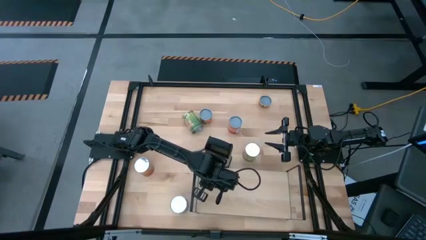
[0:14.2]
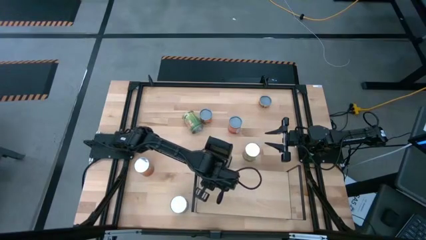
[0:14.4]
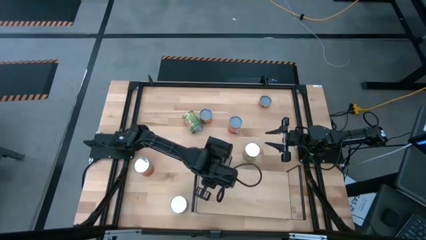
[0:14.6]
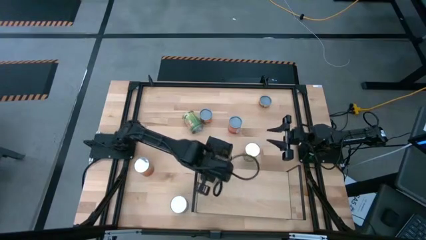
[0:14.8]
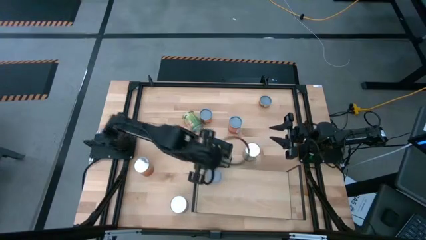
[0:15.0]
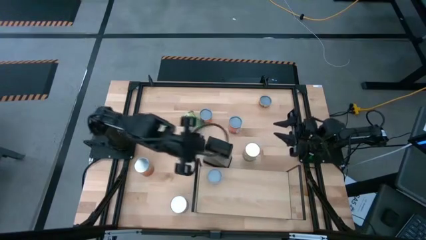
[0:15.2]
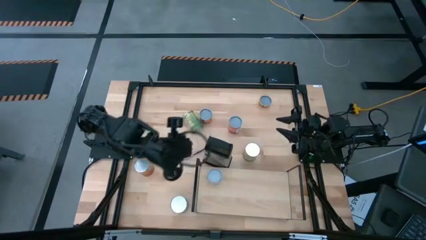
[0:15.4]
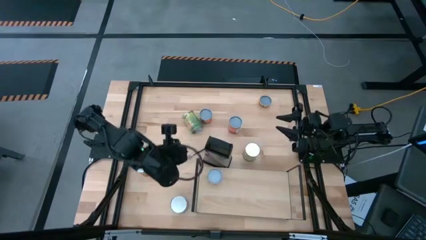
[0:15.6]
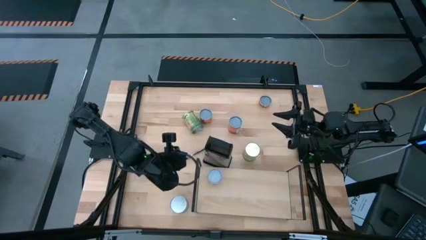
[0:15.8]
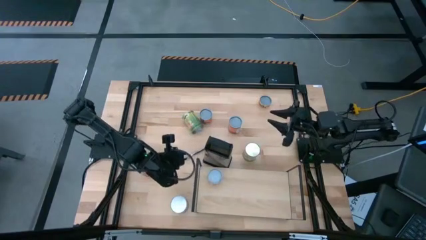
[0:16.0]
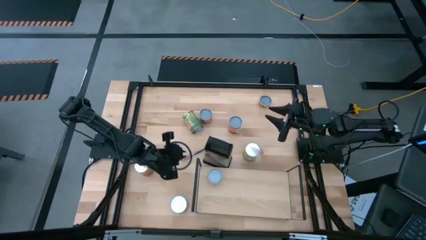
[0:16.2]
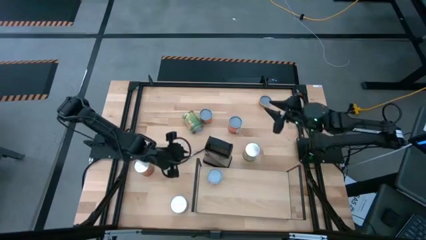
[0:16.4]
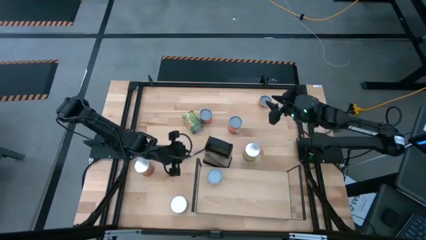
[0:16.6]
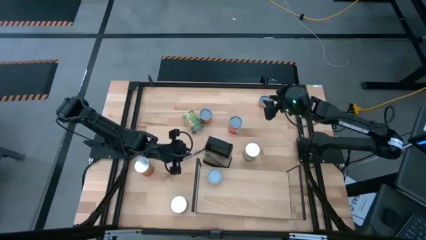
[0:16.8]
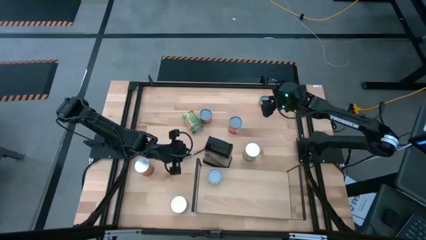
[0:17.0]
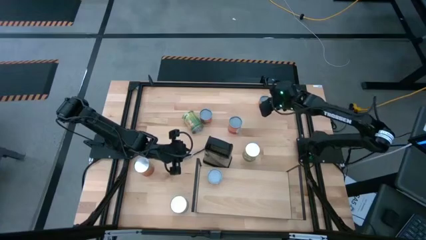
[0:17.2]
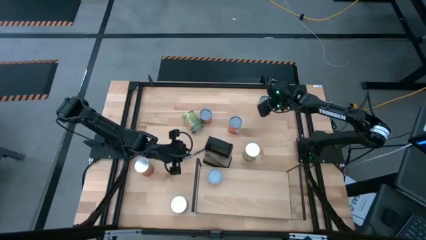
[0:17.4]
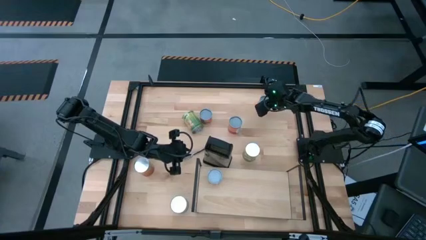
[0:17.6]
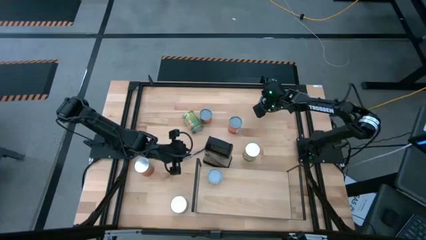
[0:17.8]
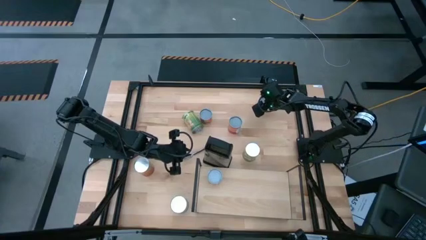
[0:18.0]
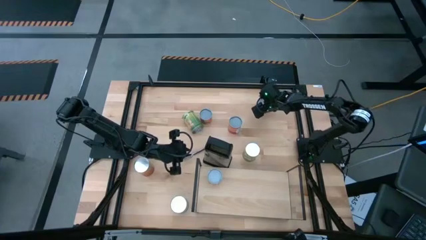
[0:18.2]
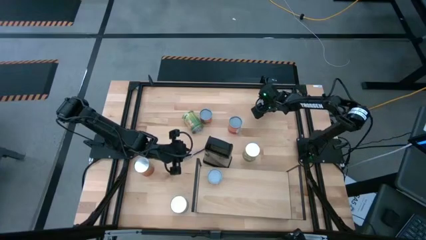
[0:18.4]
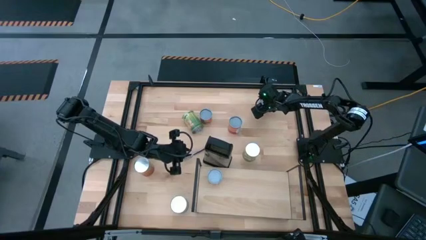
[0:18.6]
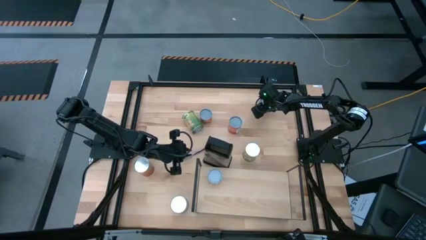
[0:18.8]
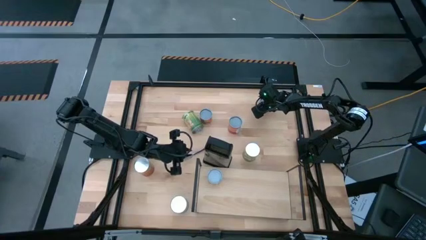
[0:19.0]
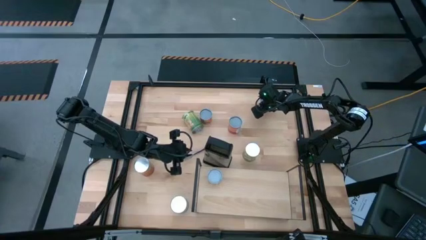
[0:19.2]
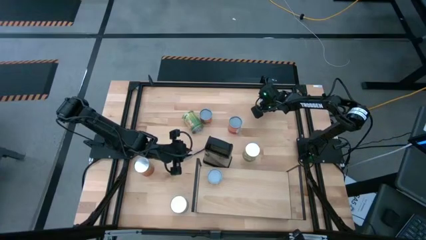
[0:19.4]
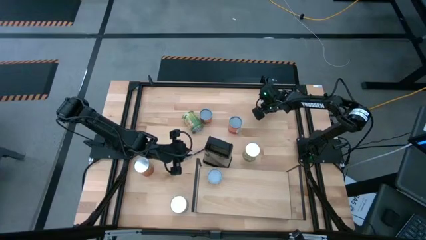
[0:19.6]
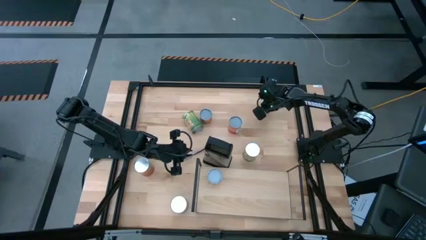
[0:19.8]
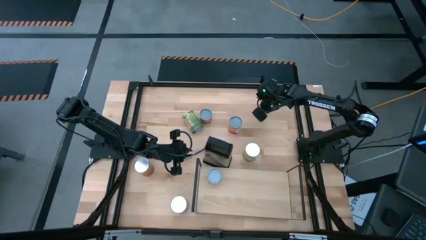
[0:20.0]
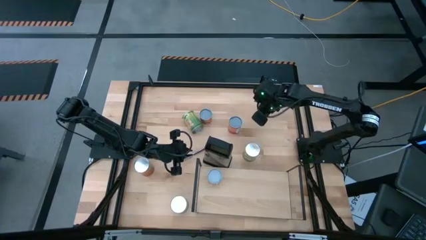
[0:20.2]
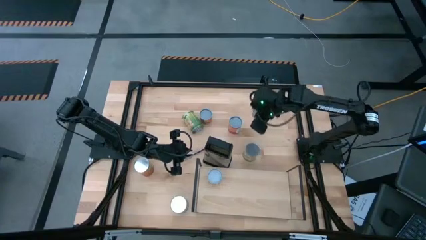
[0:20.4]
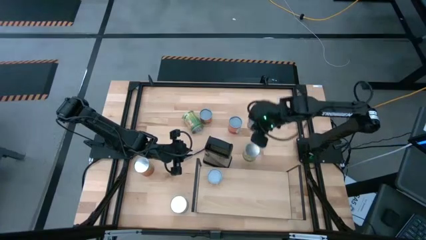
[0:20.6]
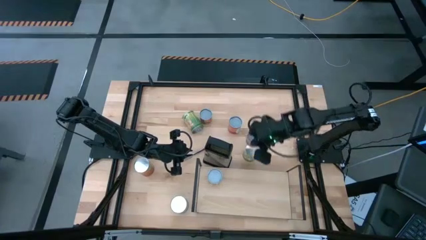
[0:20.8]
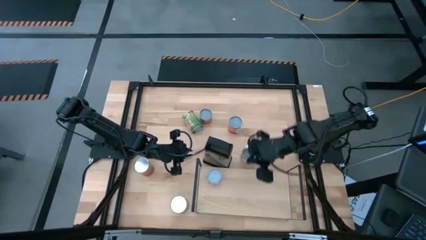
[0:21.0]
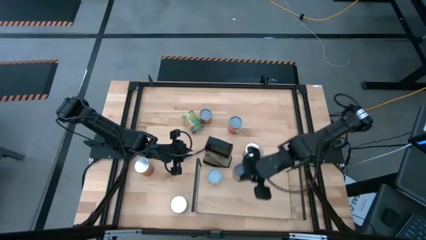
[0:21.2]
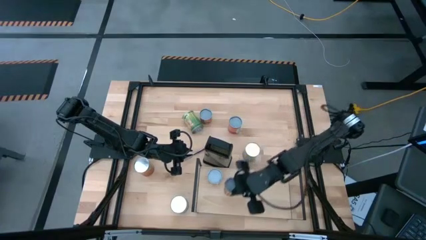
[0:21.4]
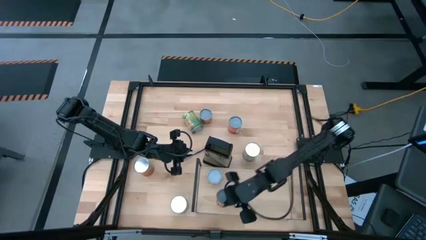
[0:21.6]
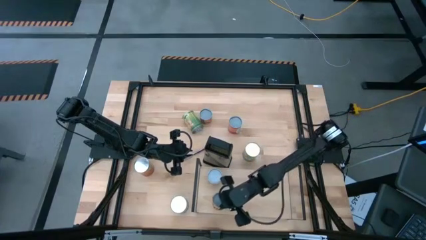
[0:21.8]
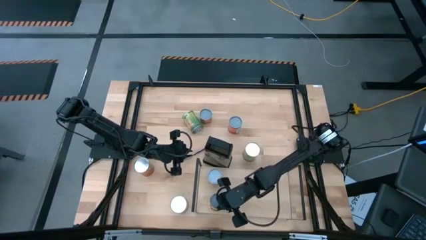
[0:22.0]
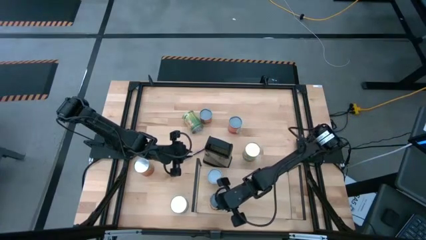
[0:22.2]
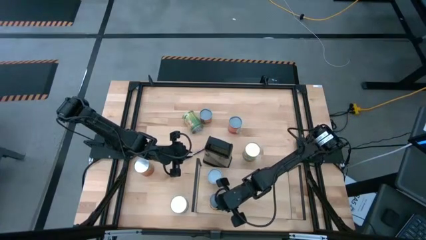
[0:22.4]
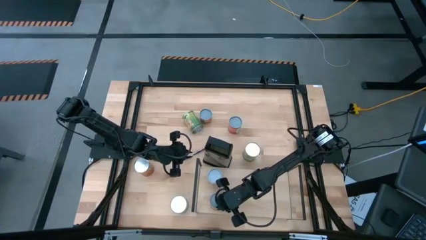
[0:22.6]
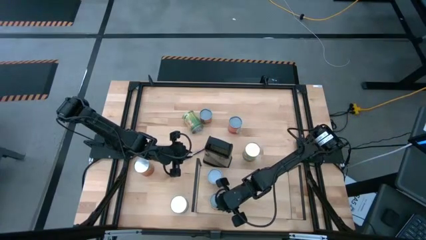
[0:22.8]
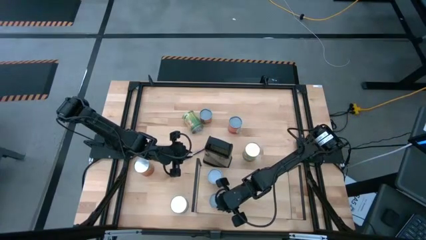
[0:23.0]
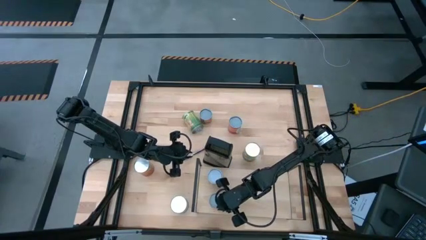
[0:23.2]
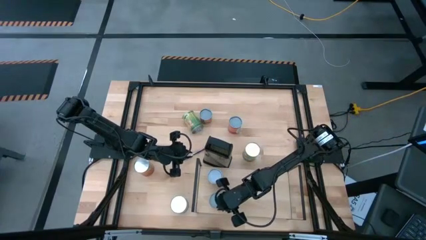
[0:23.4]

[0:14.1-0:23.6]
Task: Pick and place cans onto a shelf
Put the canned pineapple rings on the shelf

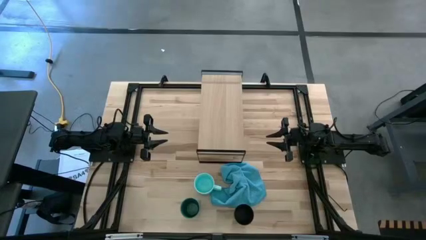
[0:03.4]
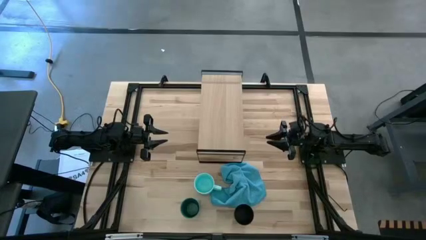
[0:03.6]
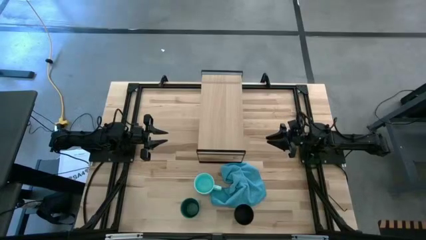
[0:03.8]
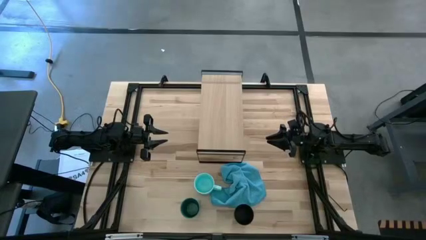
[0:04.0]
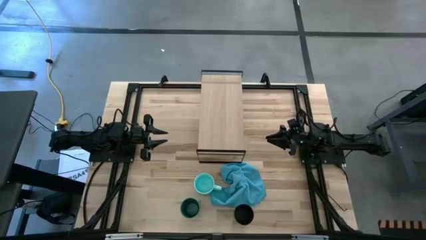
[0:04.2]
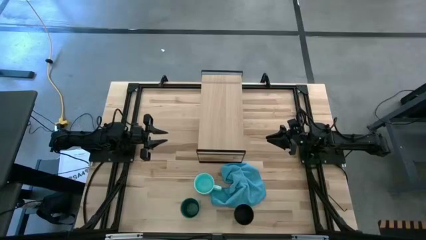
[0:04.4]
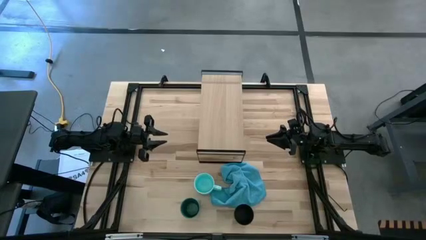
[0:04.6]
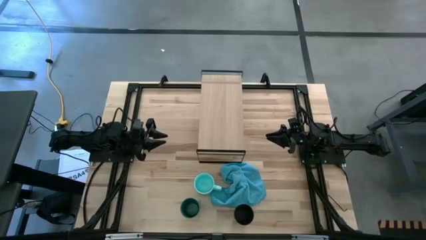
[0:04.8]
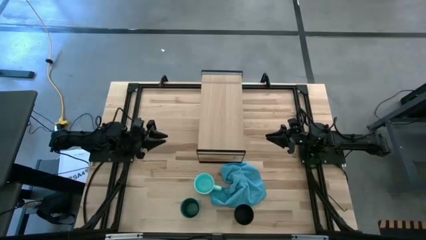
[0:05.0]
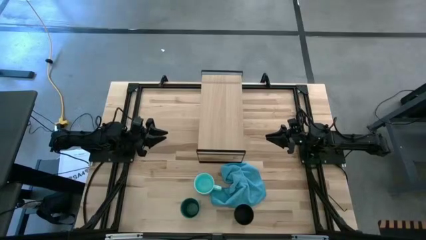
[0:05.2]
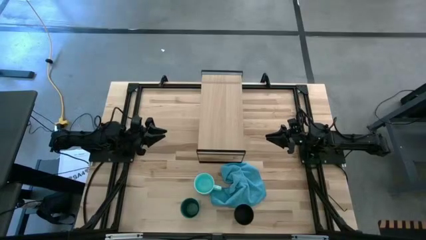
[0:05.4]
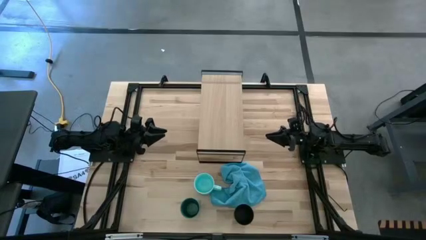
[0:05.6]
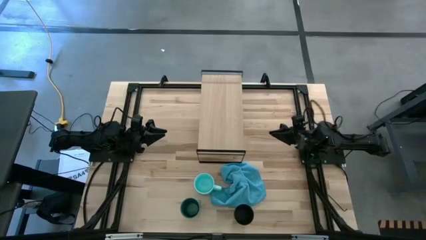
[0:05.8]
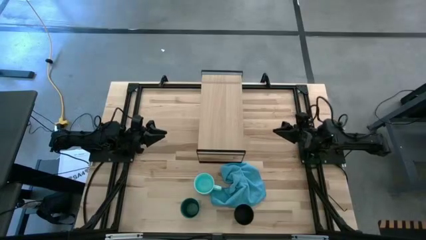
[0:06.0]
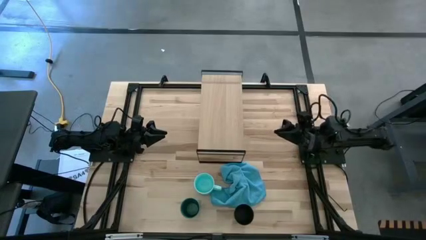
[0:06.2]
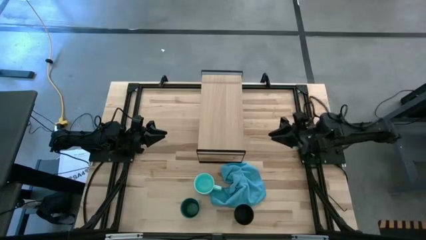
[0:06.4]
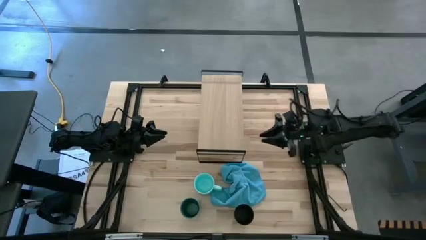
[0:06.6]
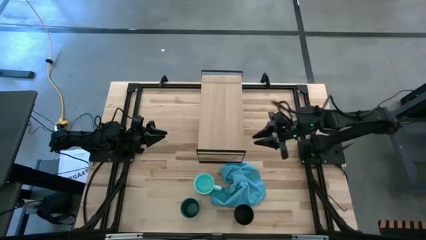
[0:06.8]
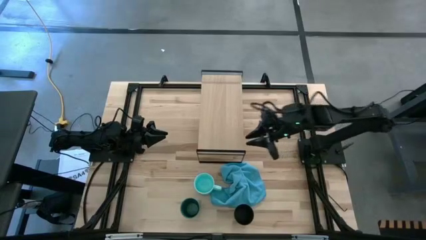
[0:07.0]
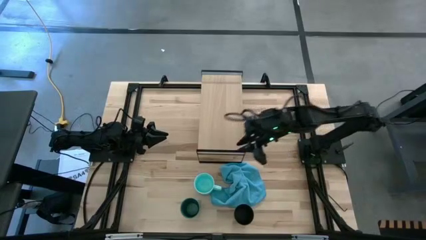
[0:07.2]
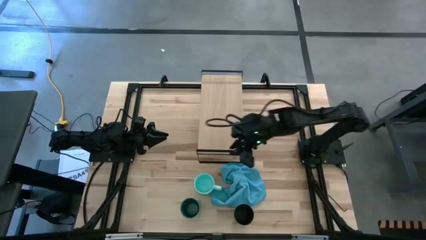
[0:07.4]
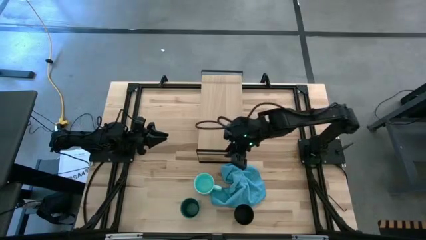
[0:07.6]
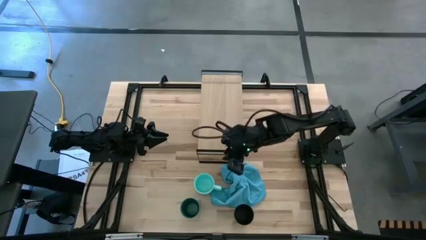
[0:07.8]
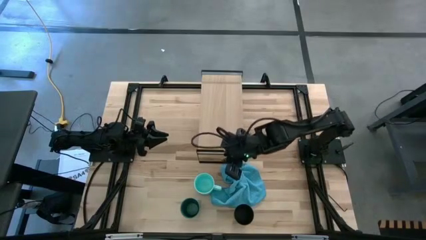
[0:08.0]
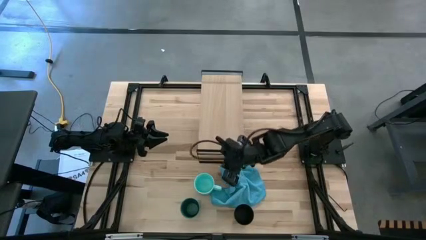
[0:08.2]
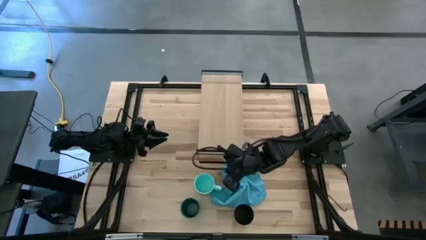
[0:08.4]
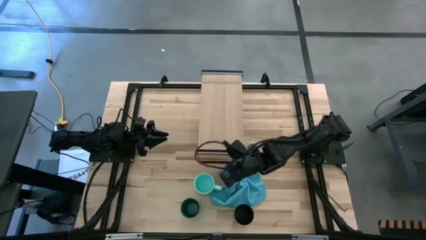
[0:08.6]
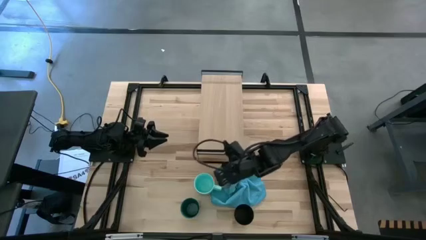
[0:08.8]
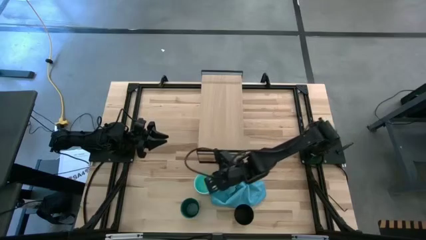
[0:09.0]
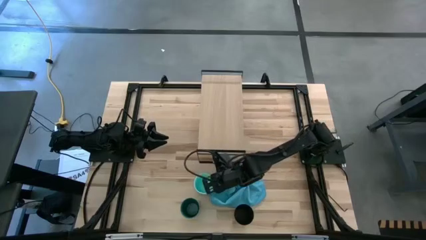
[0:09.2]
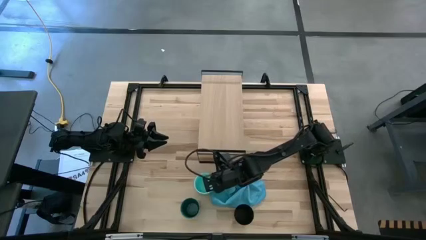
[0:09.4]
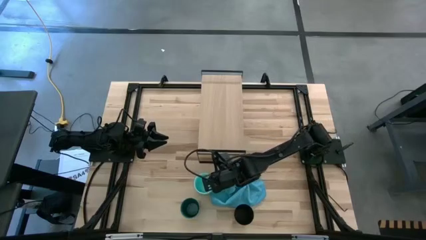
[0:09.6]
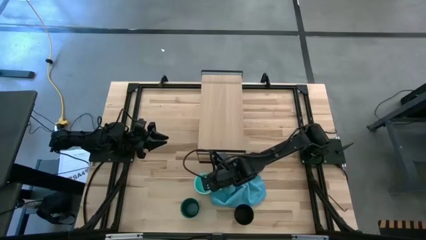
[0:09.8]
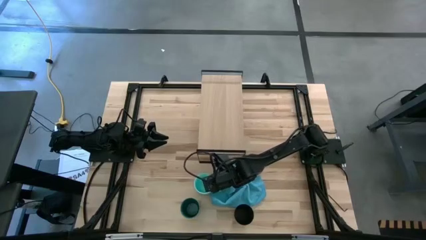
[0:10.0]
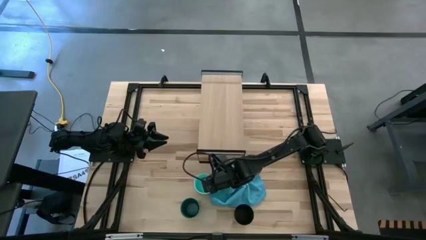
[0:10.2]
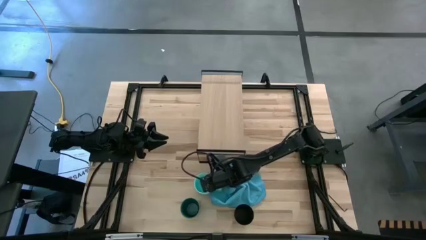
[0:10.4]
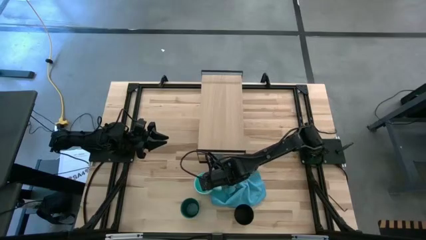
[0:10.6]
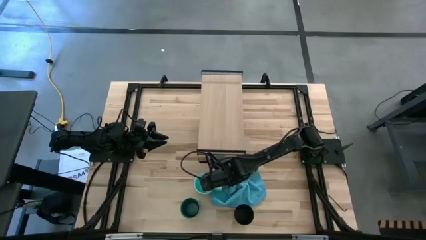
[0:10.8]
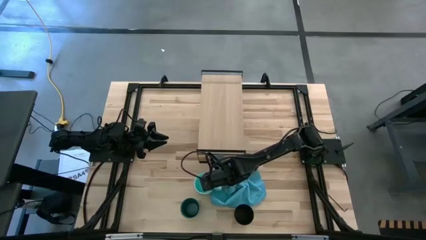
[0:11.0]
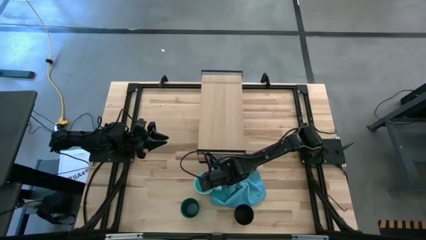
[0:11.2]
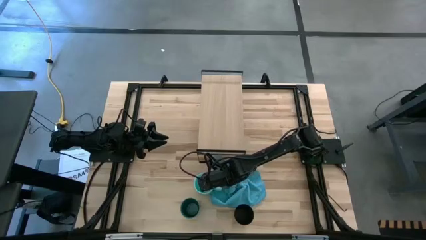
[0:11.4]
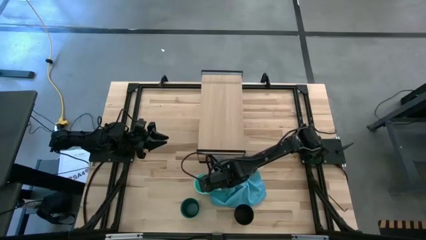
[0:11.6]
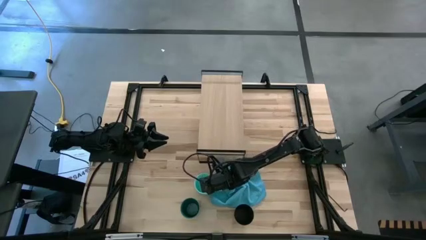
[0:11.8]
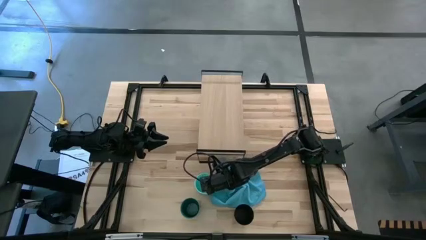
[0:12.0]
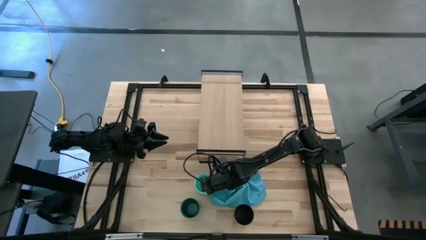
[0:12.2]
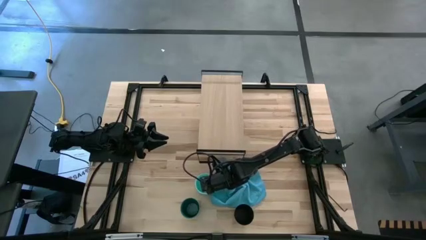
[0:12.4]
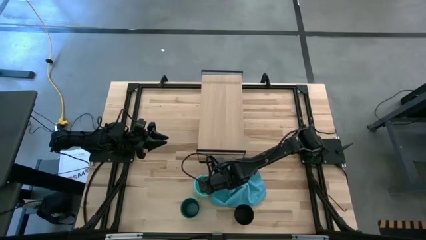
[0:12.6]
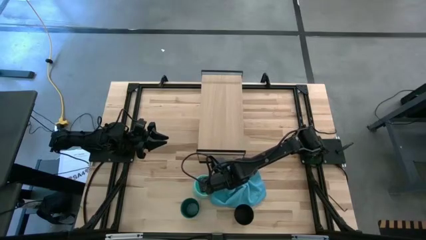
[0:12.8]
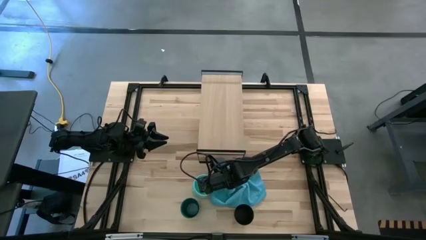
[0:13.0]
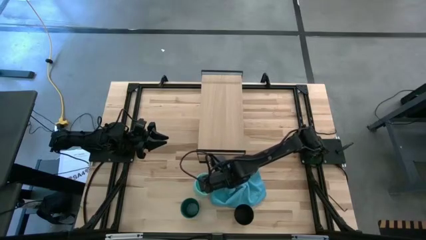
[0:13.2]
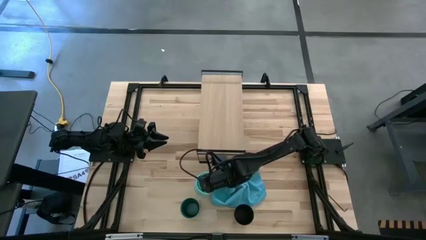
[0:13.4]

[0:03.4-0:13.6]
Task: Stack small to large cups/mugs on shelf
Put the blue mug on the shelf
